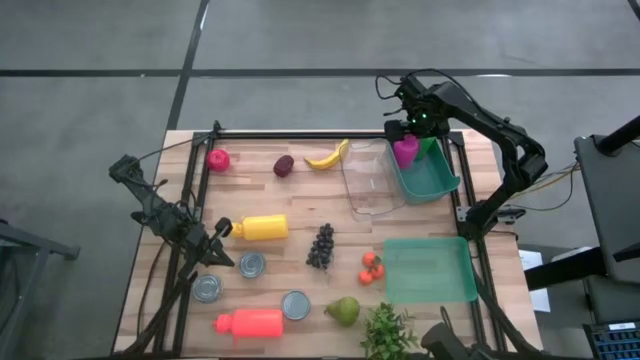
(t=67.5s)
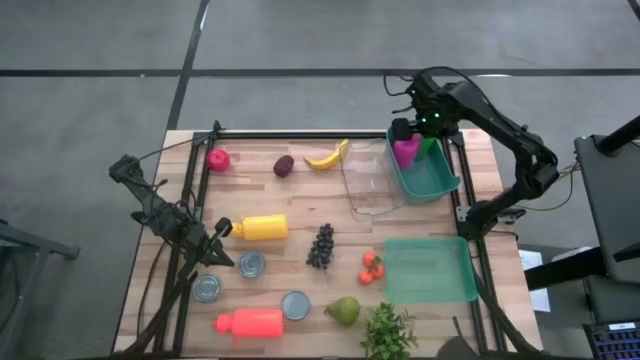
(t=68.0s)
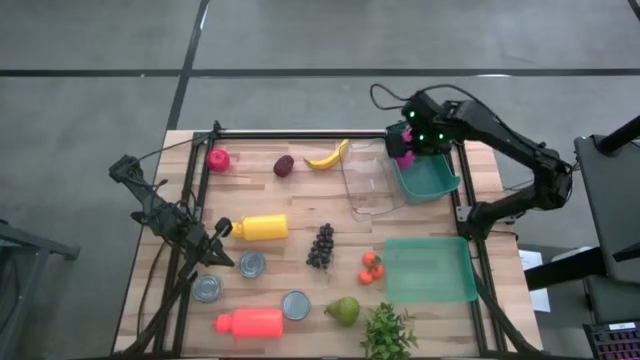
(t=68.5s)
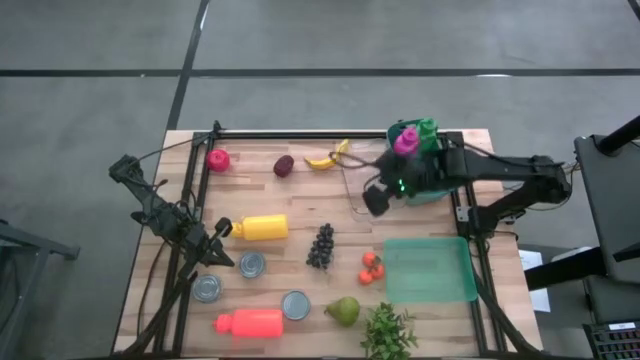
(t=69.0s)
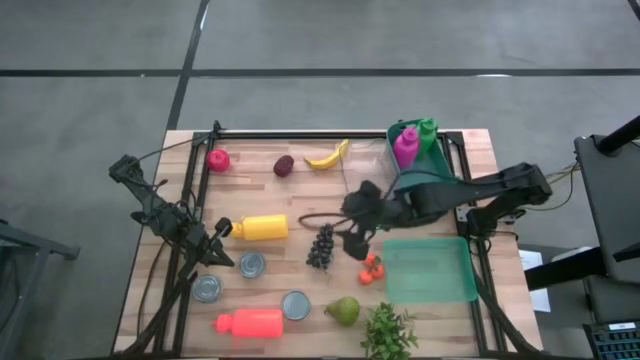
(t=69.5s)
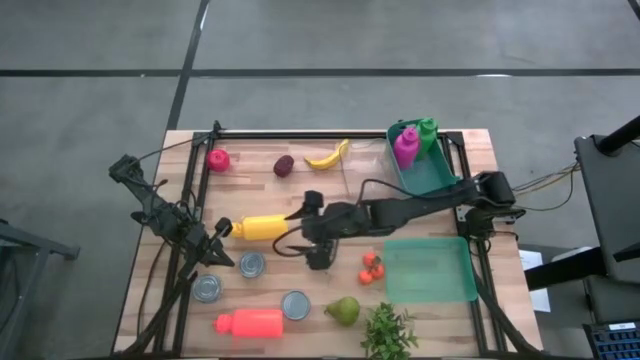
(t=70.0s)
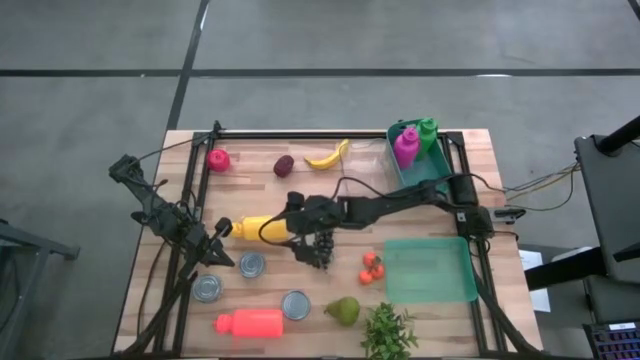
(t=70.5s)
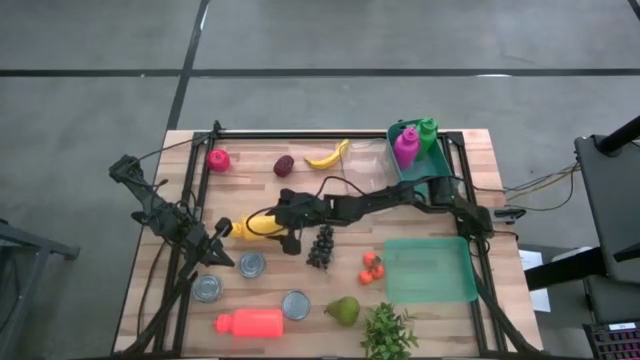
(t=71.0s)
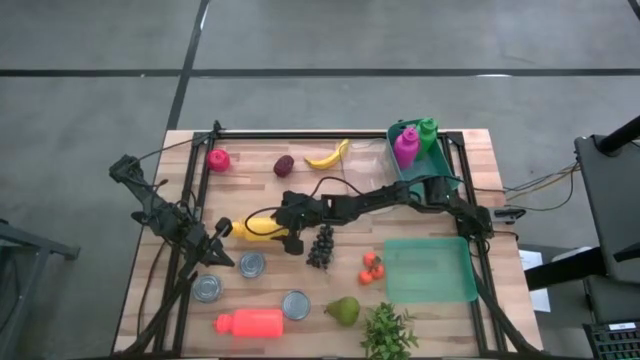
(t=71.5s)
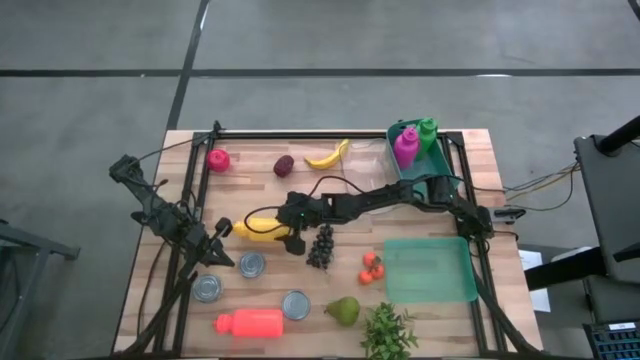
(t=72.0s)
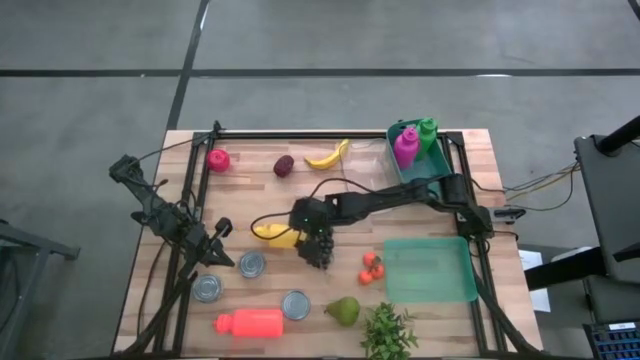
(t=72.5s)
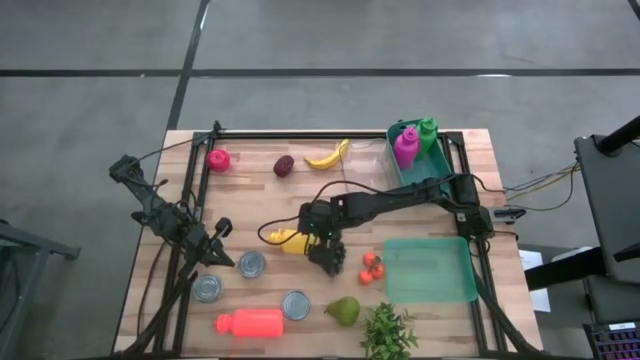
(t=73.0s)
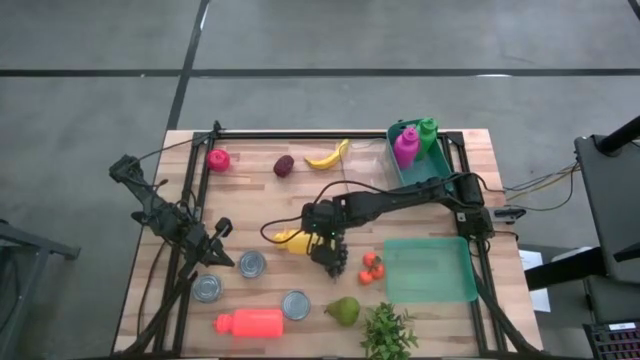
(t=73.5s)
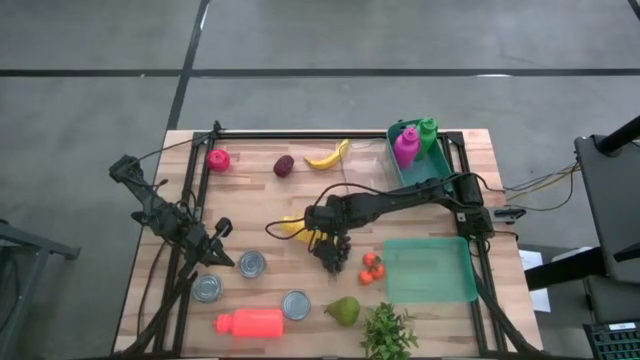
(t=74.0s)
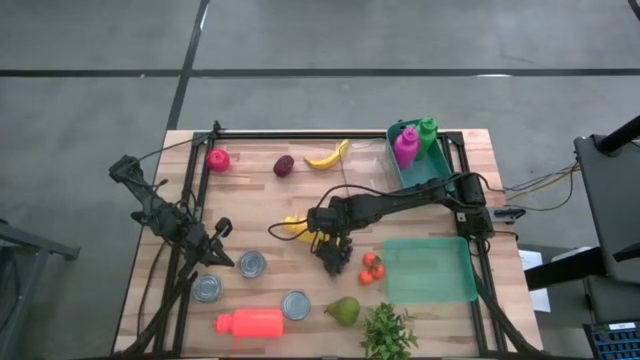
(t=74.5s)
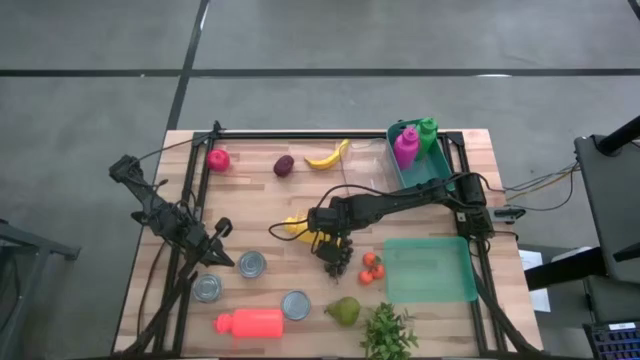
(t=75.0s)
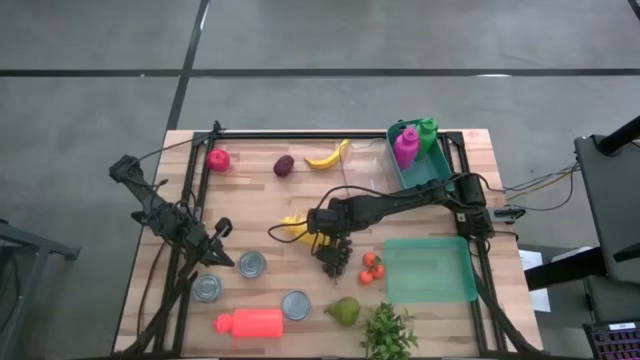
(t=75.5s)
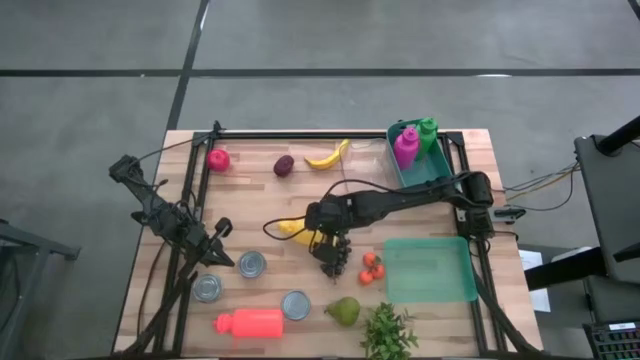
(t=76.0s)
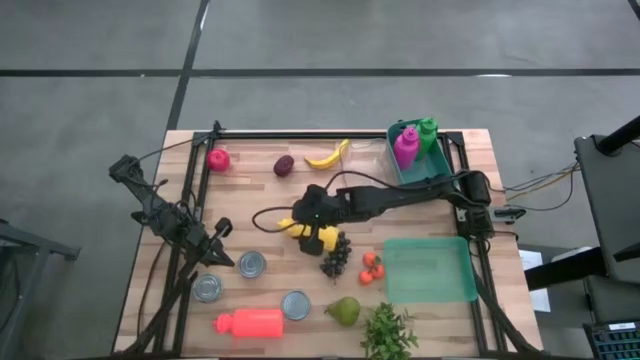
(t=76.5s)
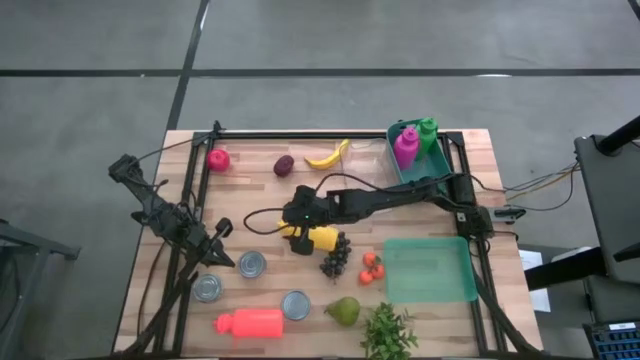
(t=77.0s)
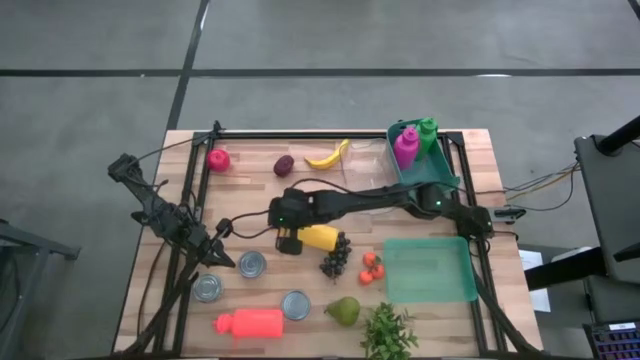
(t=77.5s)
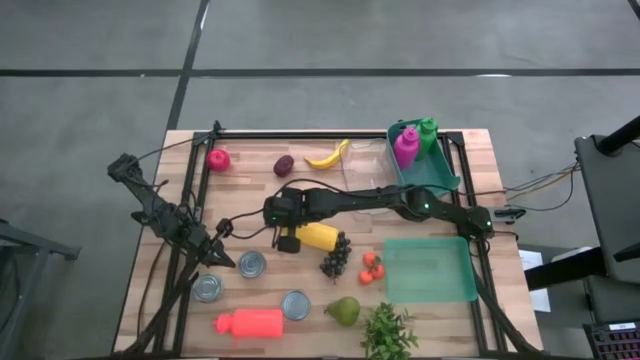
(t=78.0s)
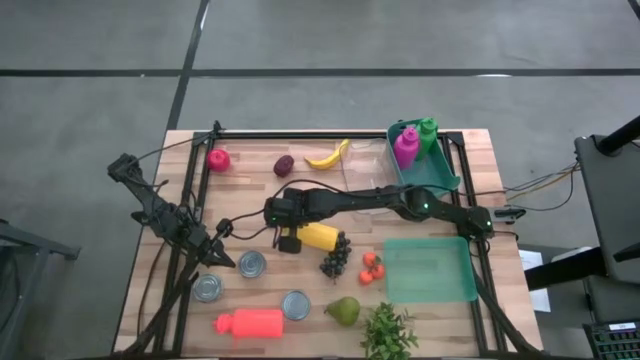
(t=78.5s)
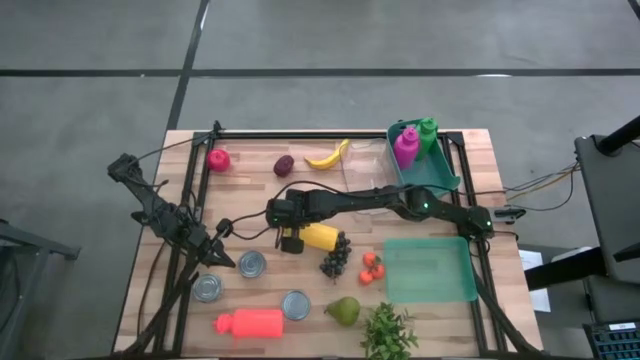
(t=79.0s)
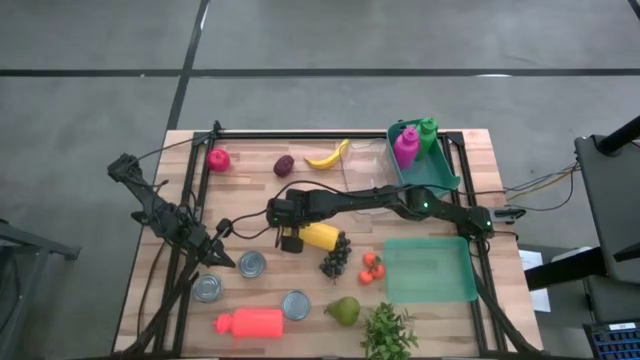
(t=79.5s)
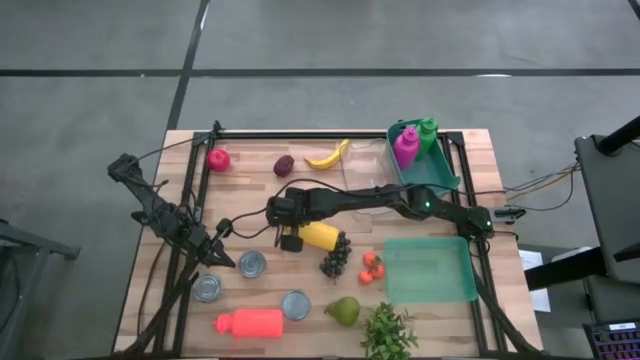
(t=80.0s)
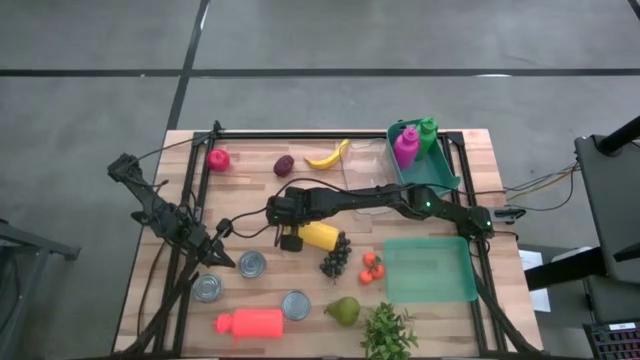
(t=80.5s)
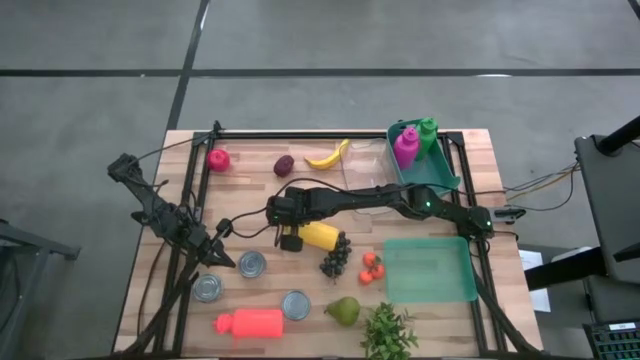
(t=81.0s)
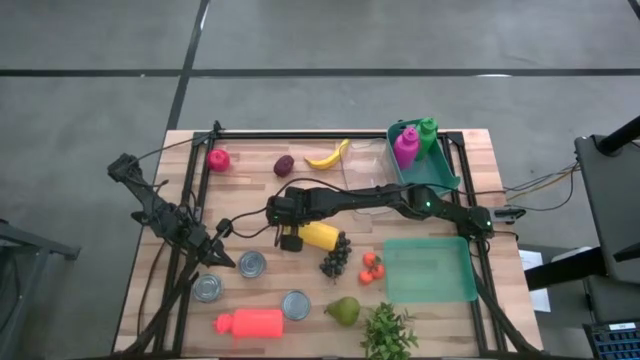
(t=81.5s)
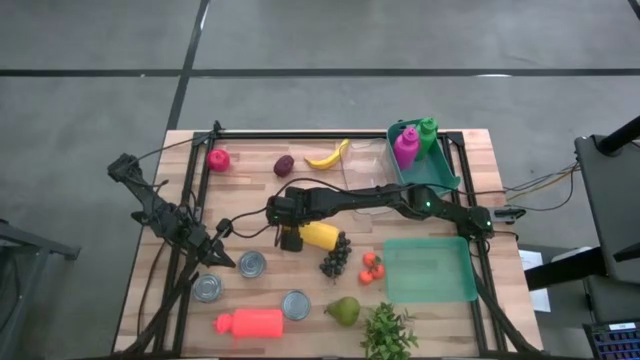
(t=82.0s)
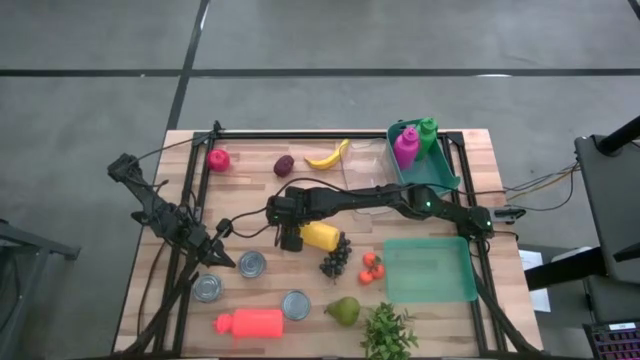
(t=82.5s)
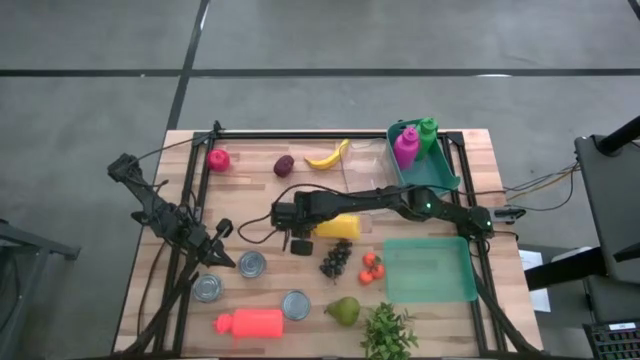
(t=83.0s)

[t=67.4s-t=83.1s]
Task: Pick & Place Food Item
Put the yellow water bottle into the green bin

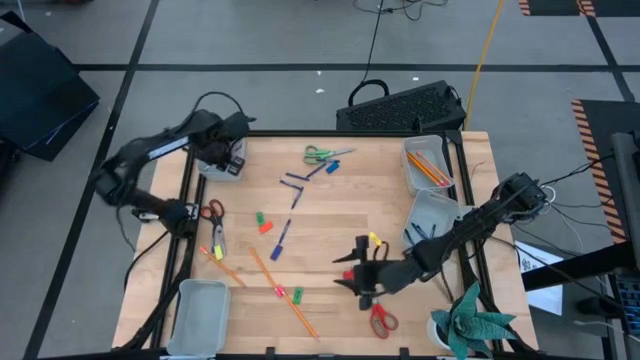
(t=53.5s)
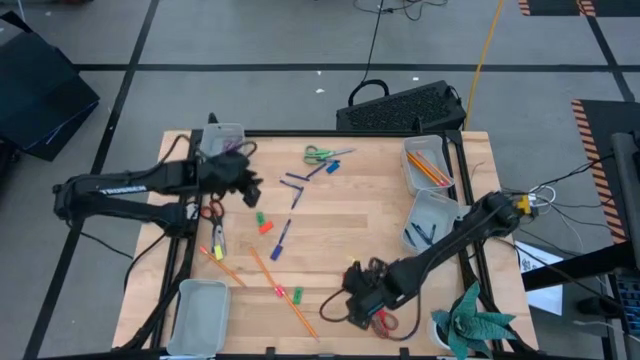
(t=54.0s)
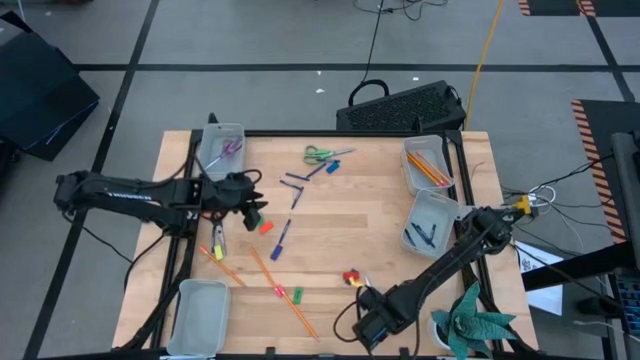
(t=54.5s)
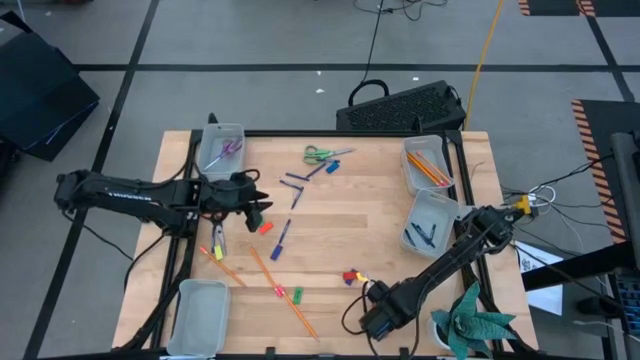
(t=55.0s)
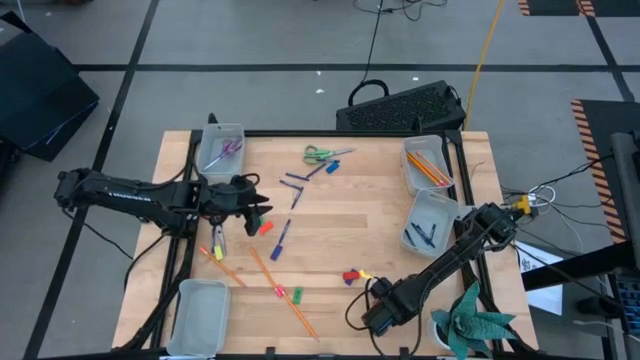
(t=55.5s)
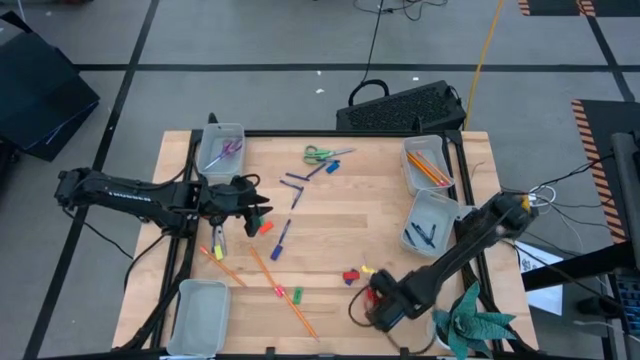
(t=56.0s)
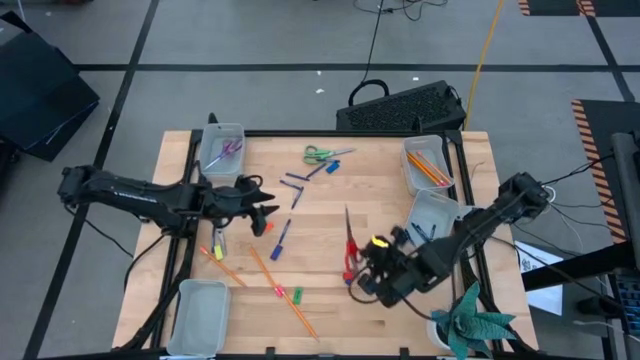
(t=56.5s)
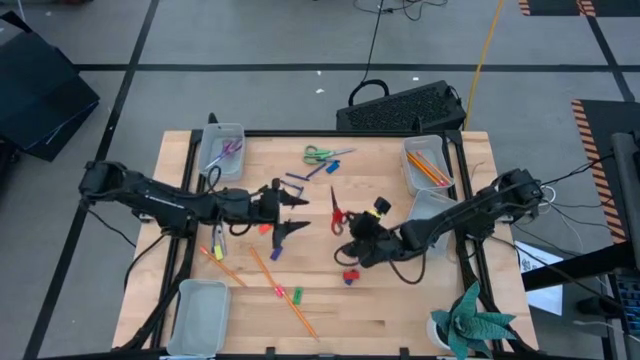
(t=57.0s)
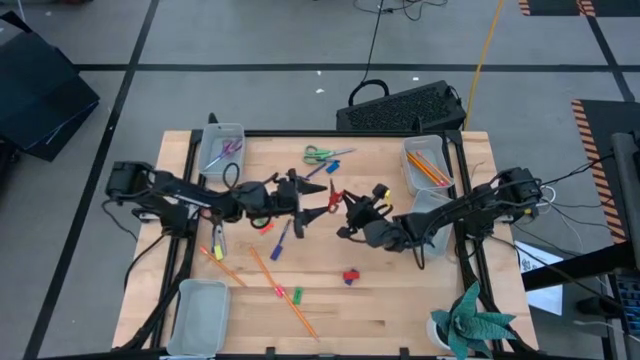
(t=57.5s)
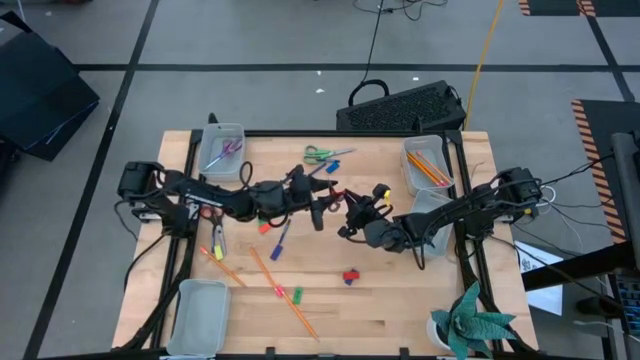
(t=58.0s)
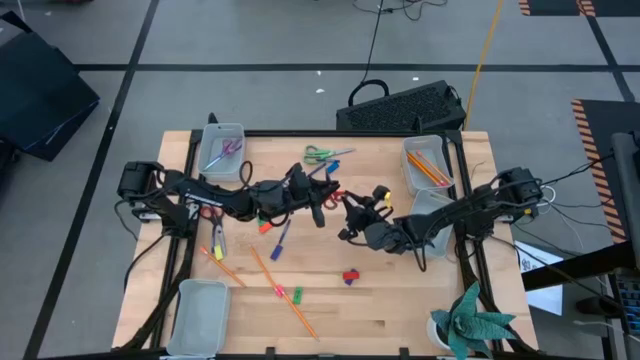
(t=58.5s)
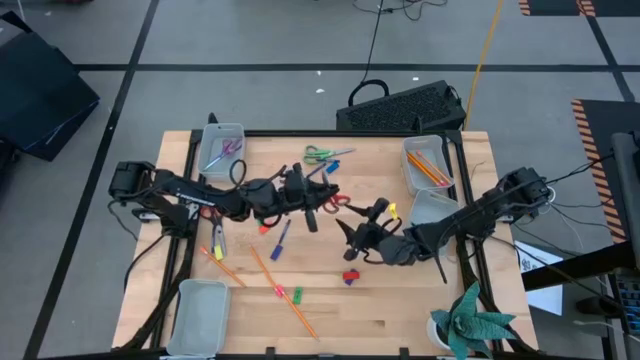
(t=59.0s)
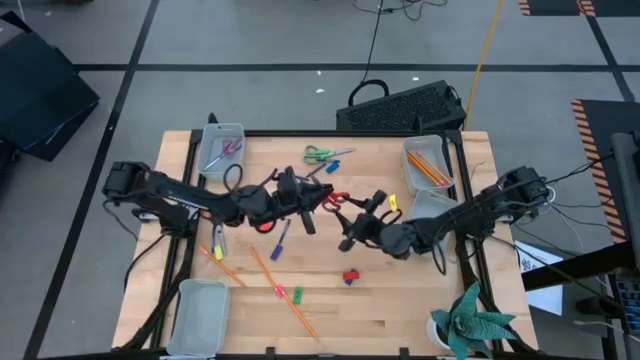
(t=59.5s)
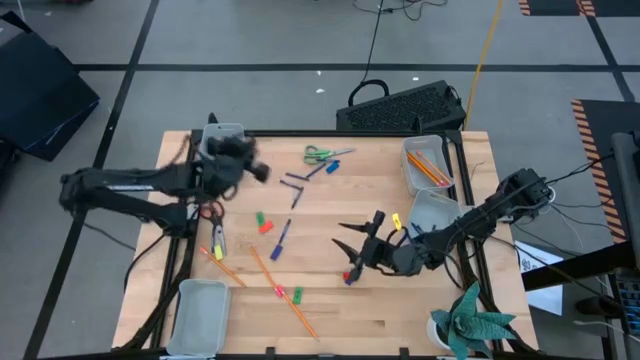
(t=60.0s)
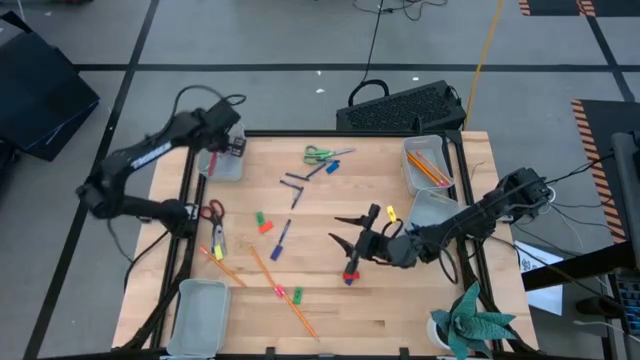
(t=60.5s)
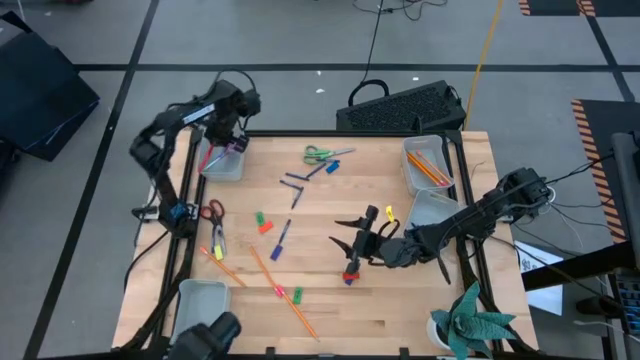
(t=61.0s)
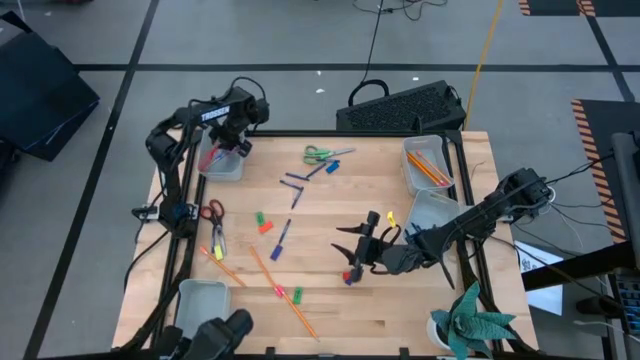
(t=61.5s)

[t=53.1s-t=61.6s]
Task: Sort crayons/erasers/pens/pencils in bins
Put the red scissor into the top left gray bin
